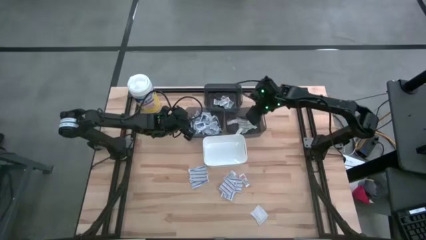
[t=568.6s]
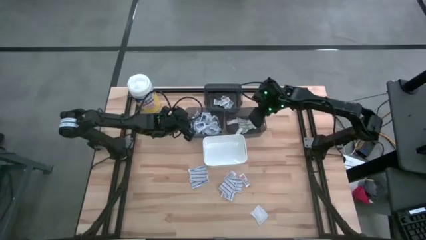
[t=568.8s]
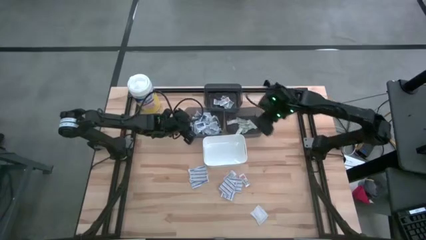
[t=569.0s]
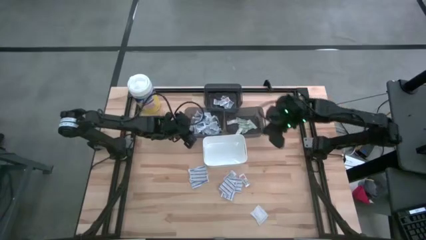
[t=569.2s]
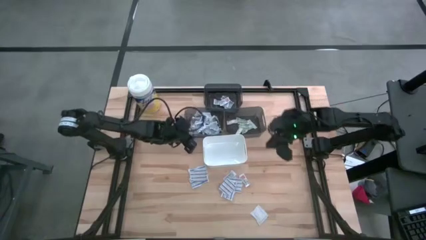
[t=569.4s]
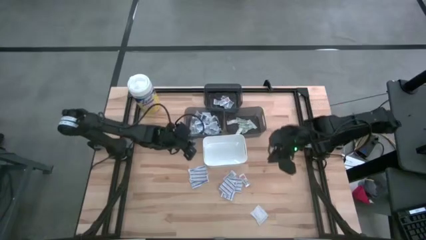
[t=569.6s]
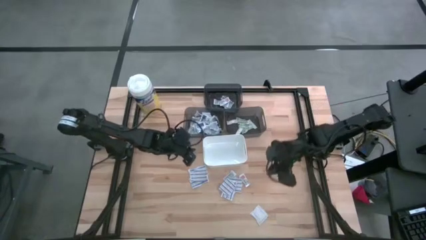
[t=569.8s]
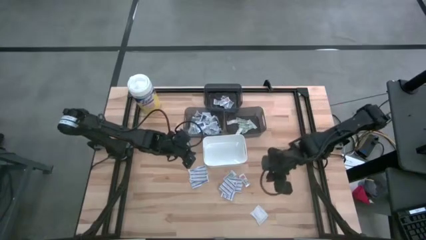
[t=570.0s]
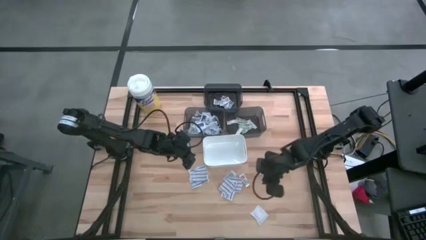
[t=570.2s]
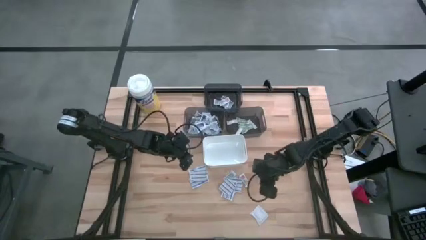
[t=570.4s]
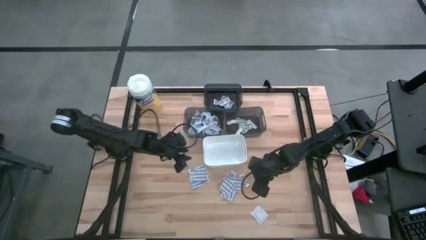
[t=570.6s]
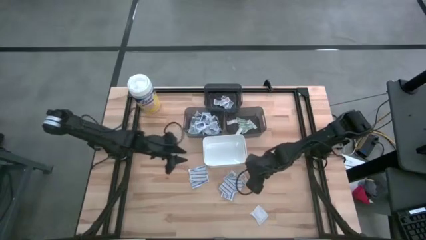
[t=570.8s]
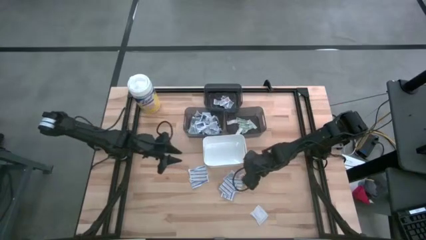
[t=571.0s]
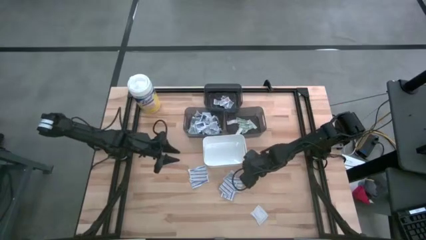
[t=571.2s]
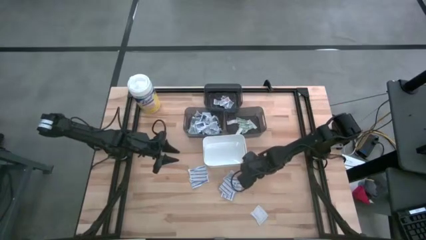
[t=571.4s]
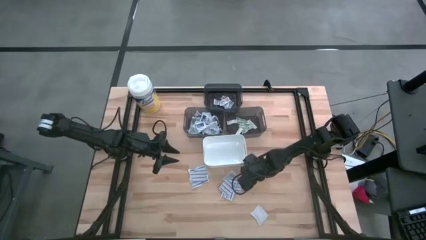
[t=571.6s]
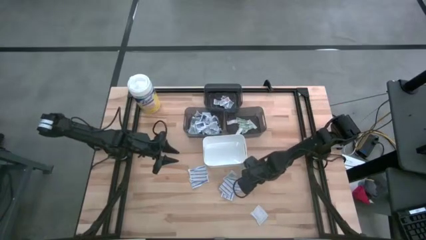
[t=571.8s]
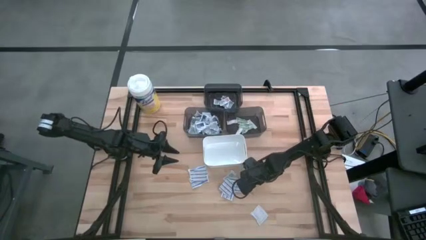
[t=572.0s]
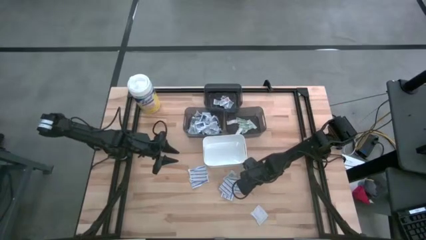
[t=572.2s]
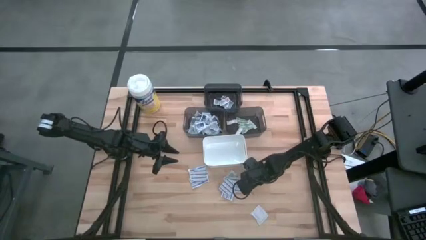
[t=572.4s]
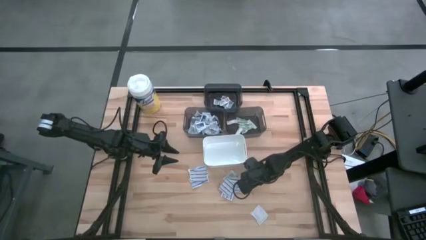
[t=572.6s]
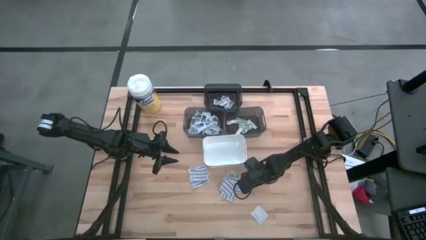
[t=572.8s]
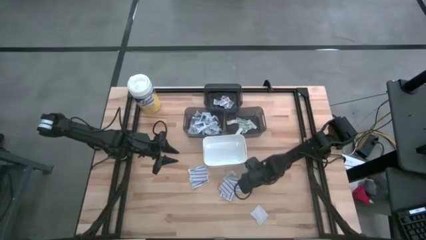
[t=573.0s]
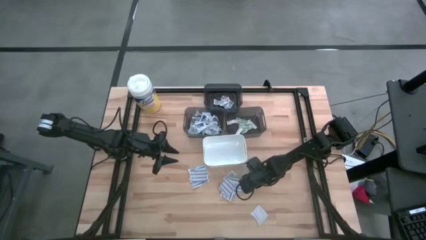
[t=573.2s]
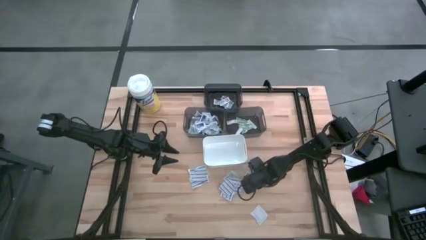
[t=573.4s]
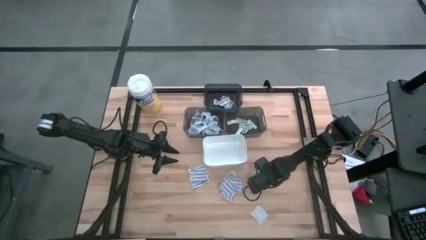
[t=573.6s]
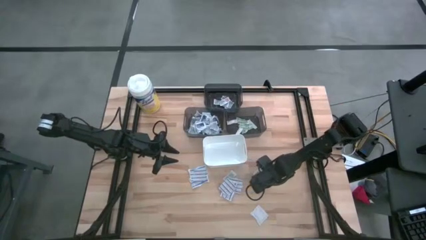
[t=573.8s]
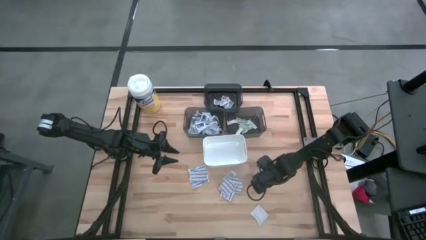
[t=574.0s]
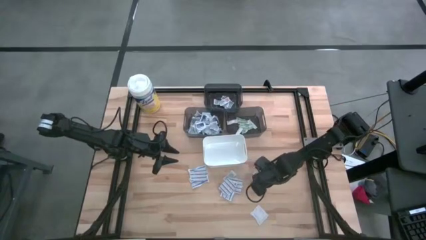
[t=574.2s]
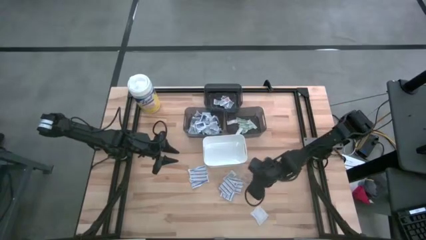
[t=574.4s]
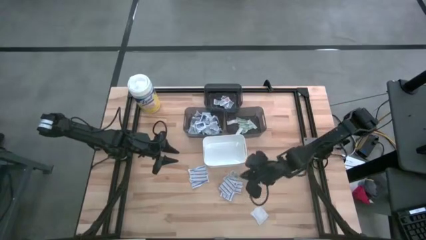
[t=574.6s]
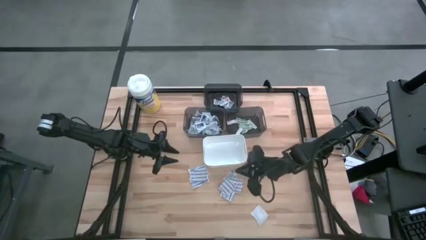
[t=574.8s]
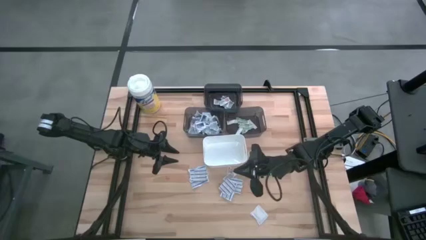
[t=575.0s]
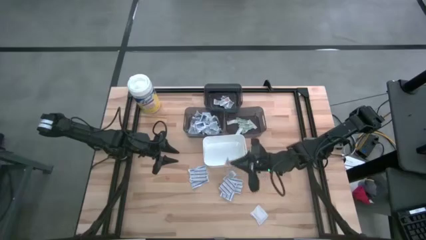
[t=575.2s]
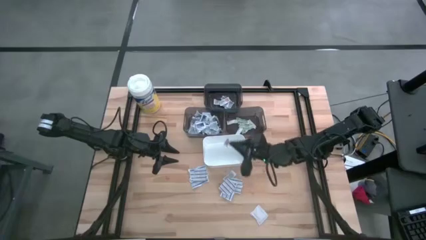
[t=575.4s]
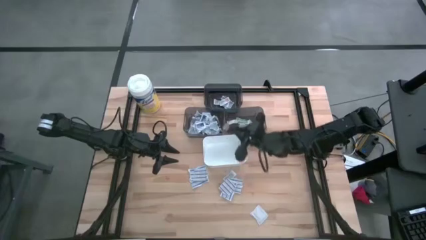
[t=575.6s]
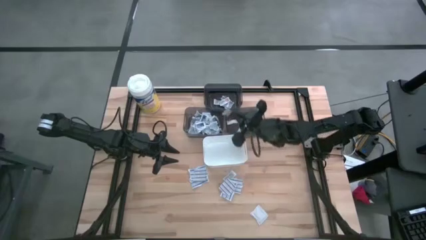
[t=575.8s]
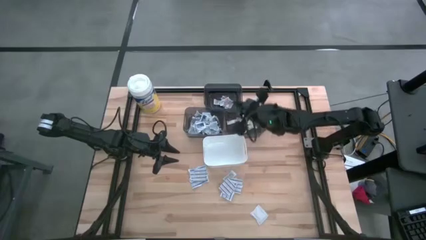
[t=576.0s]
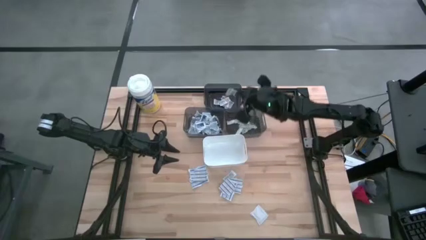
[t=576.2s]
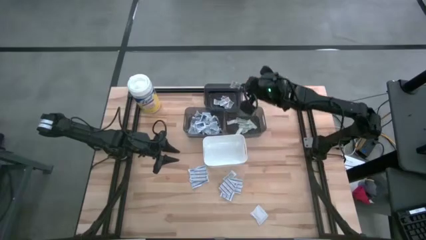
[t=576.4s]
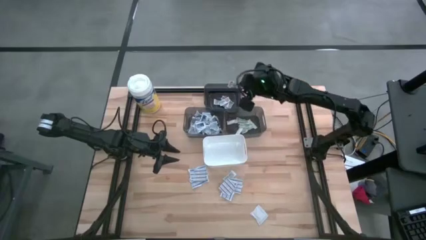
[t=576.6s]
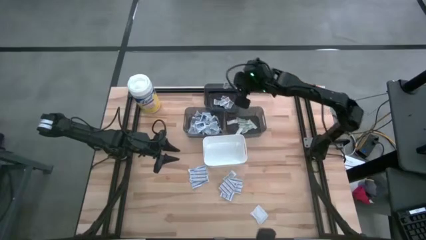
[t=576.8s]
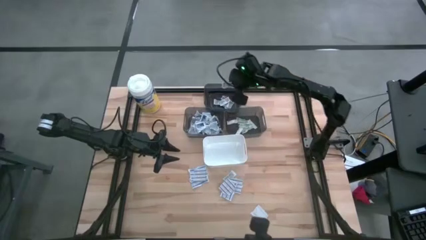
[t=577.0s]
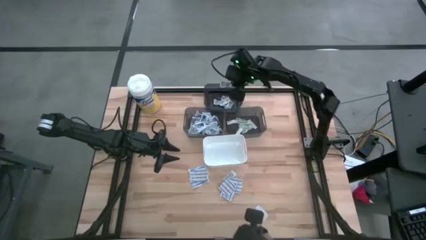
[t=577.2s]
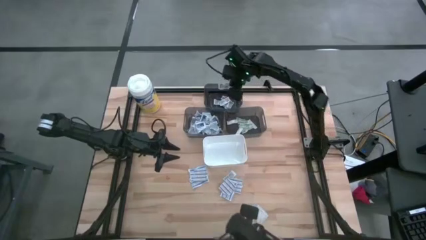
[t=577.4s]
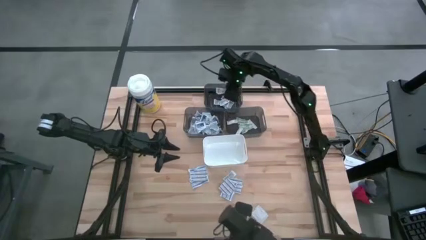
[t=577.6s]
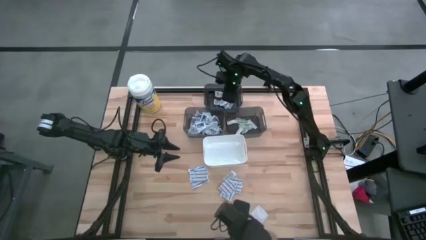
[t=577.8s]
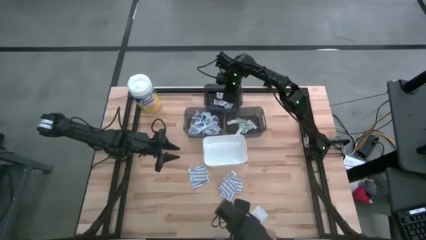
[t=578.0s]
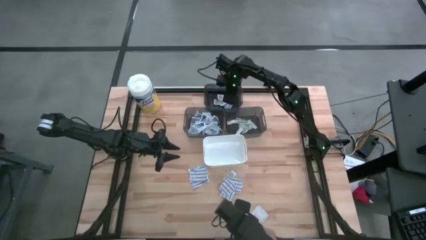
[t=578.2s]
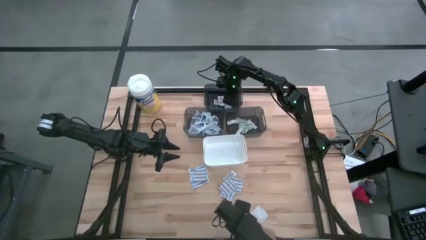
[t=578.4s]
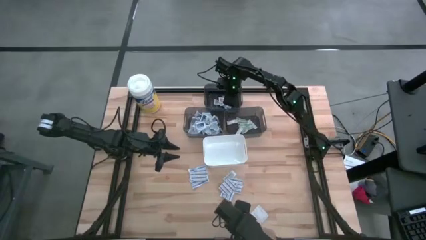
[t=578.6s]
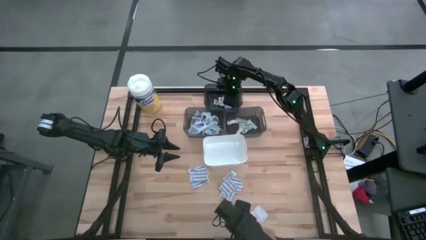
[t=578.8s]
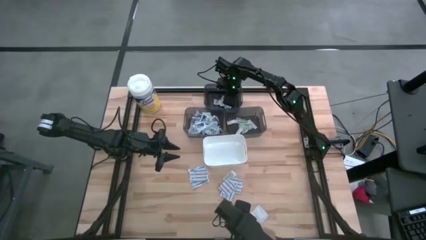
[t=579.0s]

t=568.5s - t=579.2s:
Task: Pick & Place First Aid Supplies
Put the ointment pack into the top black bin

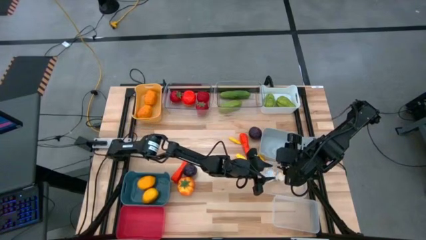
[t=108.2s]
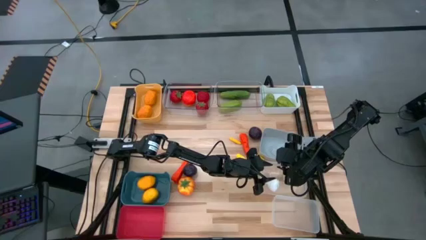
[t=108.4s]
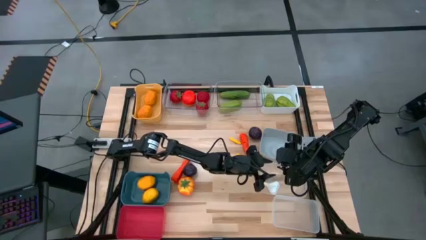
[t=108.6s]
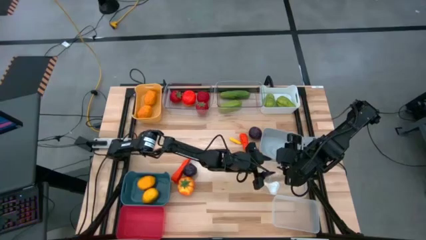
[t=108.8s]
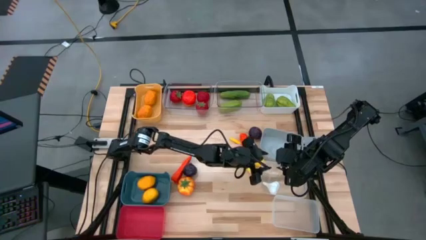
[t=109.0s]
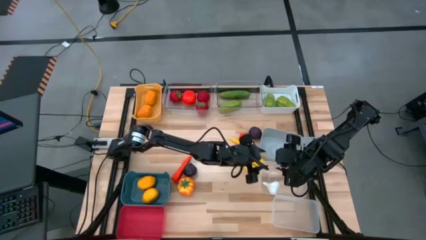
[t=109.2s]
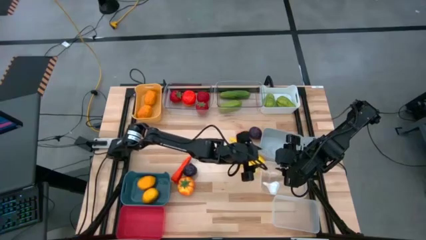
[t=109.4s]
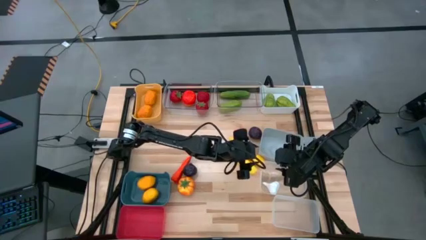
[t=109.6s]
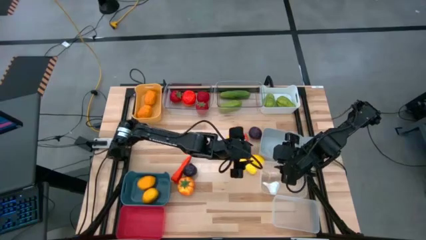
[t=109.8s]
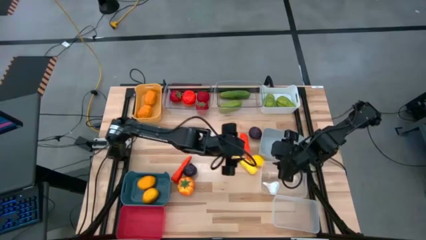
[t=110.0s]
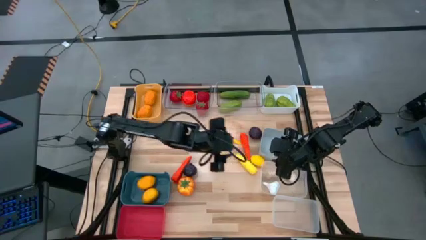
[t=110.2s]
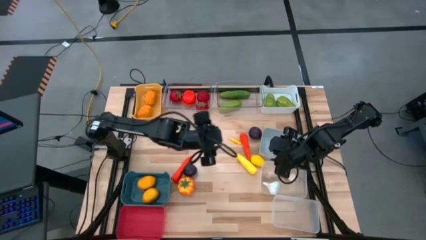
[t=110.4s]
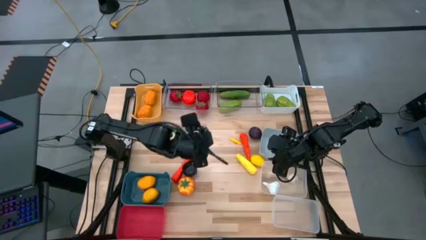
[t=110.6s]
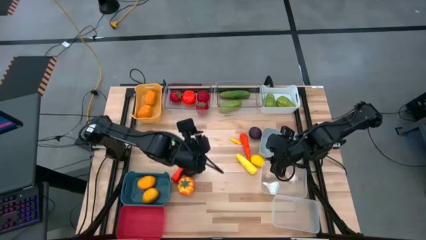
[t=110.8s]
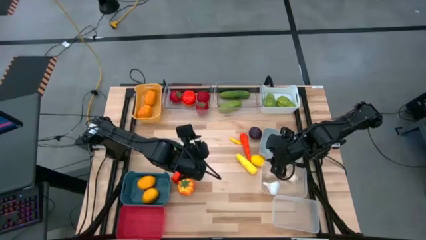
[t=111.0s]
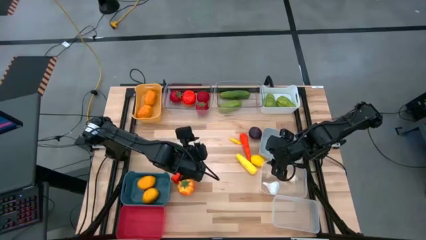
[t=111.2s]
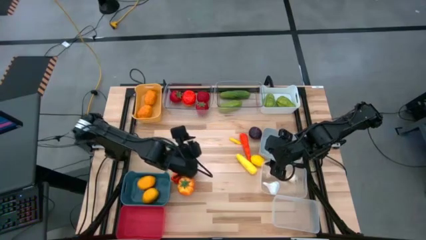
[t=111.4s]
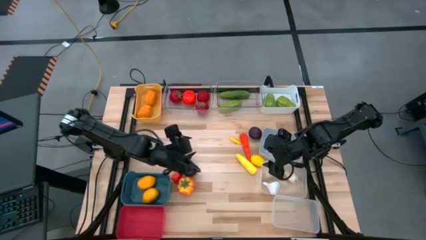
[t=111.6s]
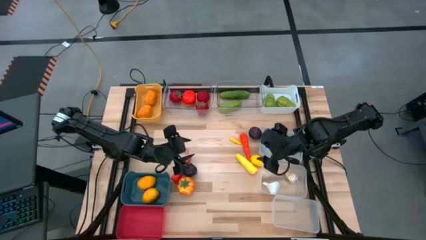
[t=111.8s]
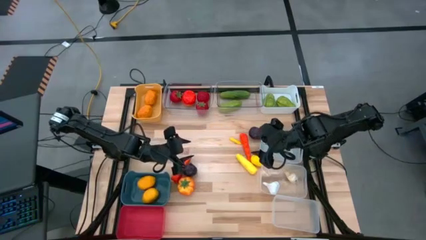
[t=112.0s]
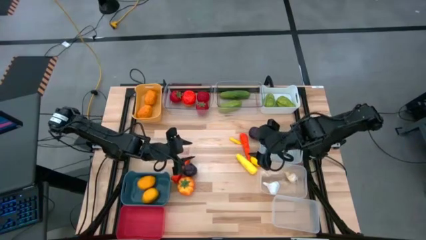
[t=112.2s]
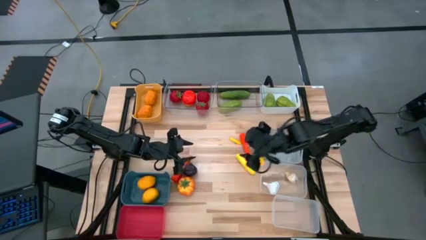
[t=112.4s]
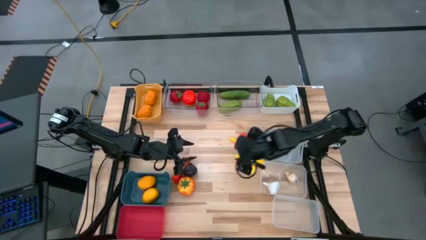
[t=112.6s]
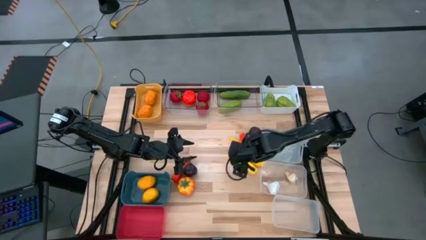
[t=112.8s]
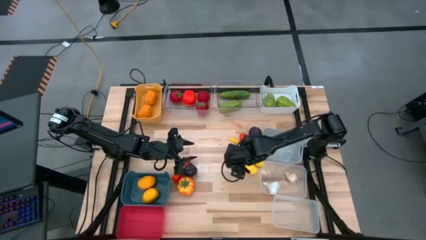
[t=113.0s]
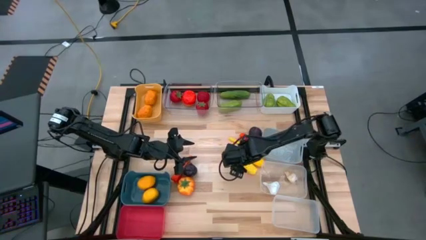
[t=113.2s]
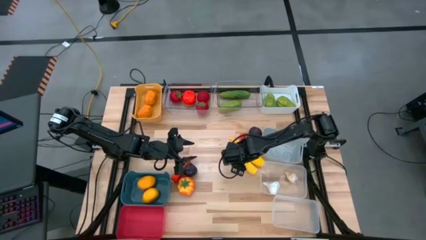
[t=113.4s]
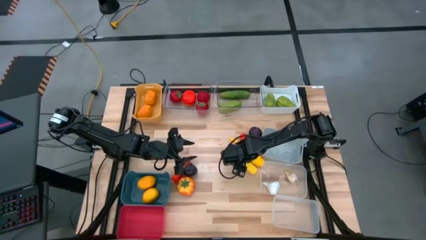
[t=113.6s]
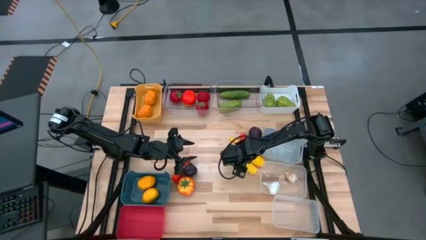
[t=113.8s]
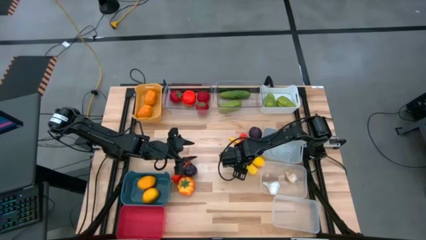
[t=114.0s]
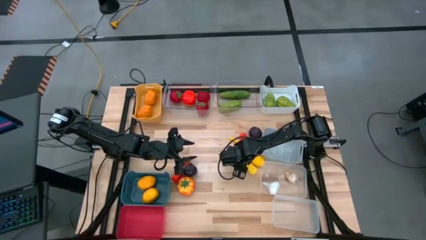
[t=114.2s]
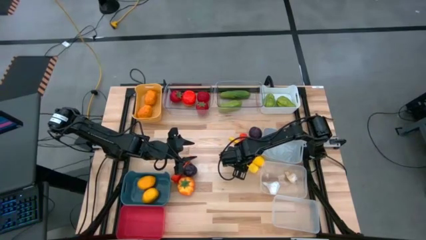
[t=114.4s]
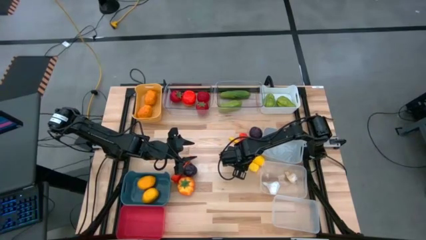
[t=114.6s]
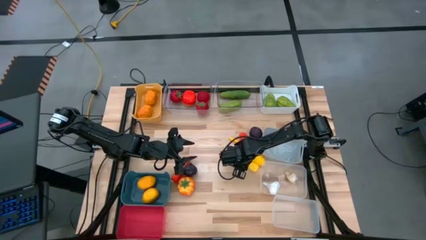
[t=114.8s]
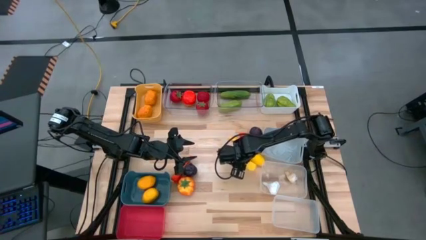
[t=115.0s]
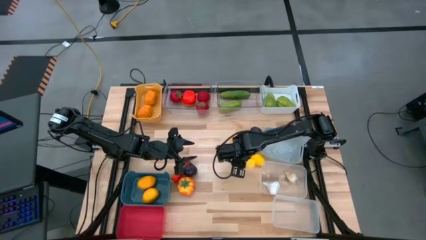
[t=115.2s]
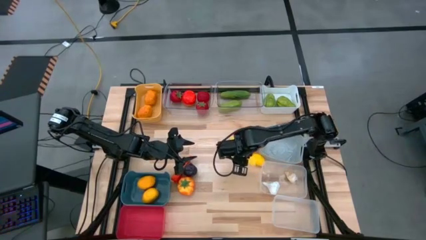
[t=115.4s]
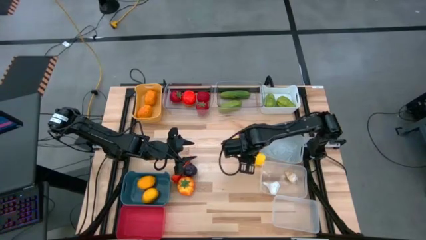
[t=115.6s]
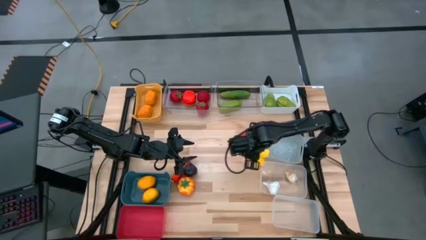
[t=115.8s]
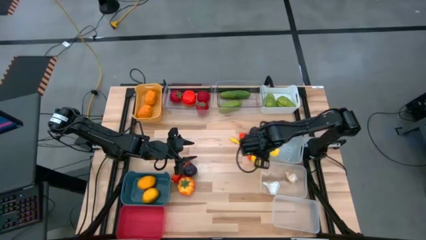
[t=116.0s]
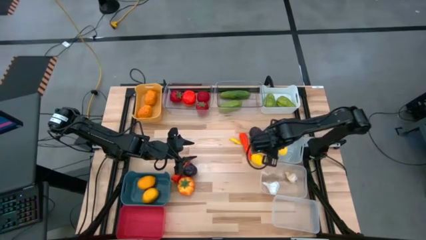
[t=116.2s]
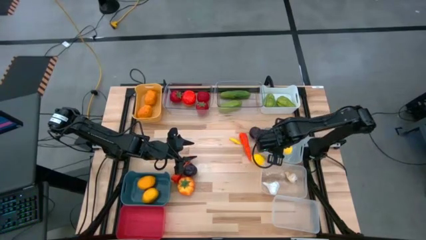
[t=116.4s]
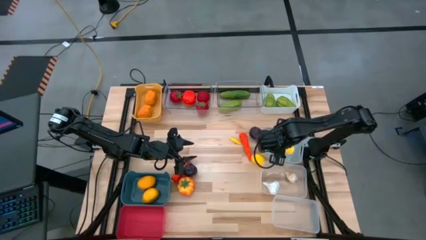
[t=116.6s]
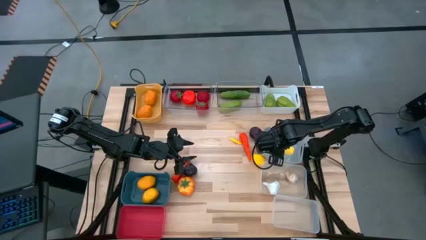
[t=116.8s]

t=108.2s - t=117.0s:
Task: Sort produce into baskets
Put the yellow corn into the gray bin
